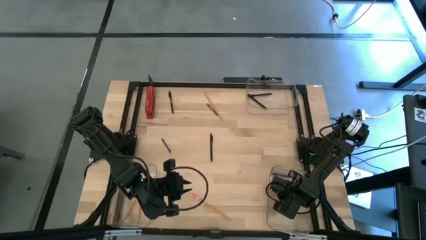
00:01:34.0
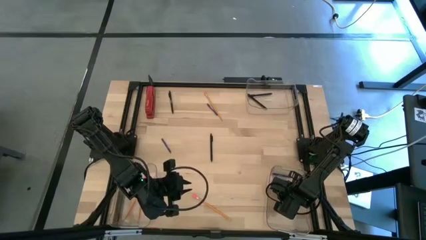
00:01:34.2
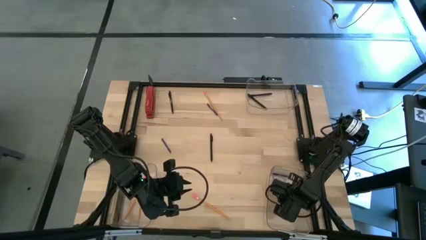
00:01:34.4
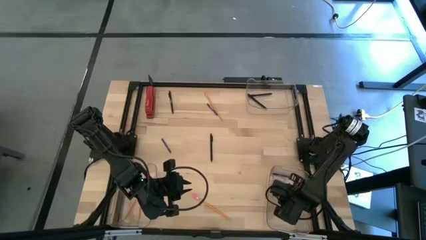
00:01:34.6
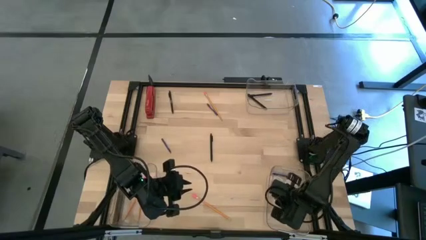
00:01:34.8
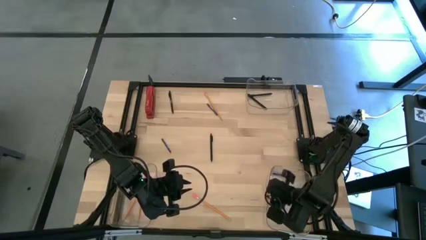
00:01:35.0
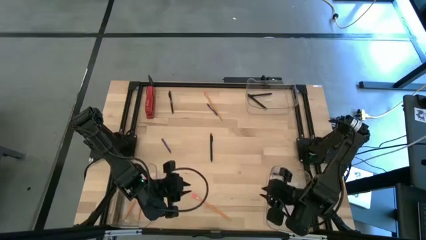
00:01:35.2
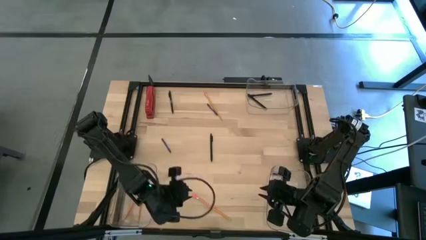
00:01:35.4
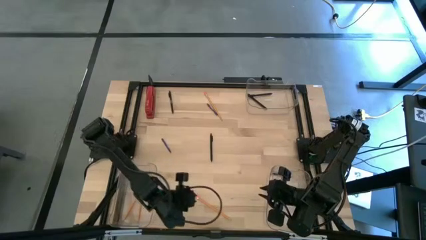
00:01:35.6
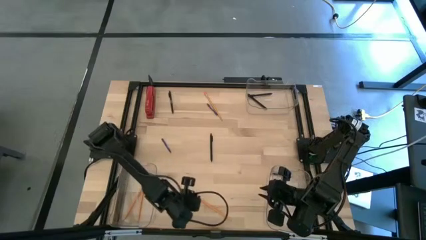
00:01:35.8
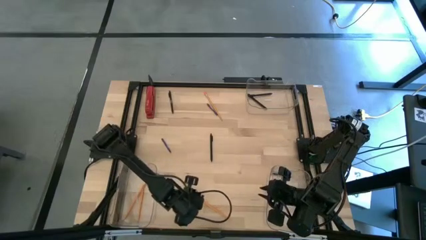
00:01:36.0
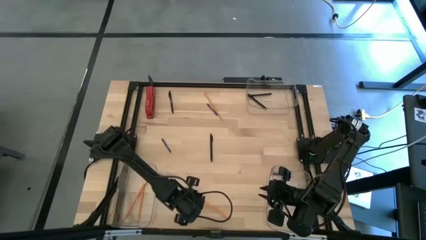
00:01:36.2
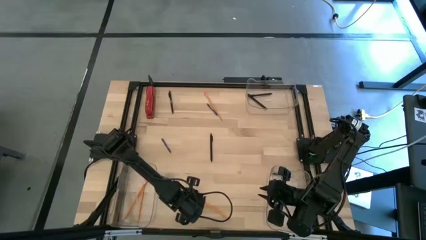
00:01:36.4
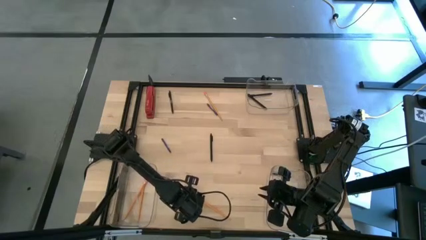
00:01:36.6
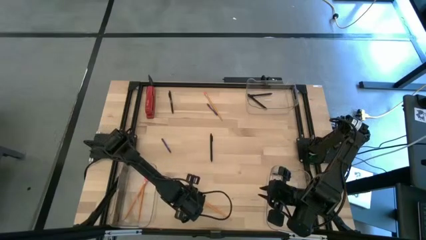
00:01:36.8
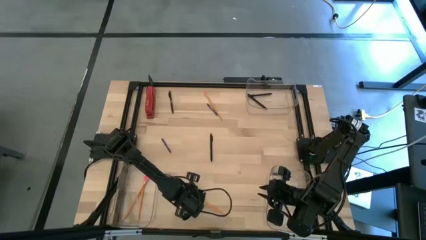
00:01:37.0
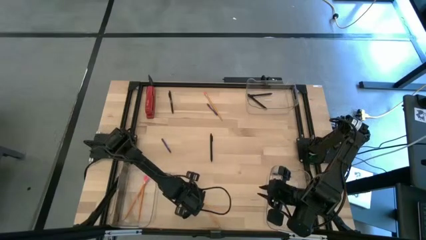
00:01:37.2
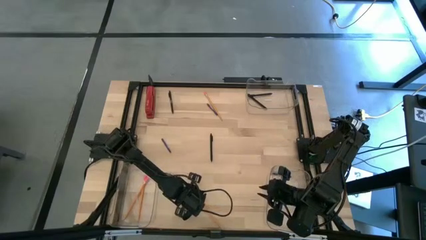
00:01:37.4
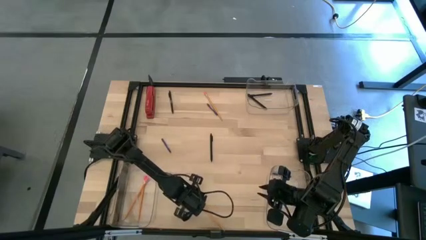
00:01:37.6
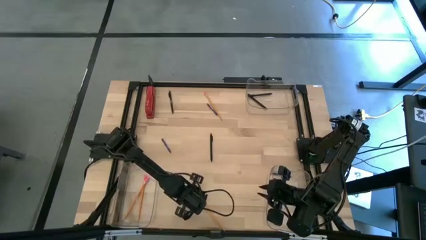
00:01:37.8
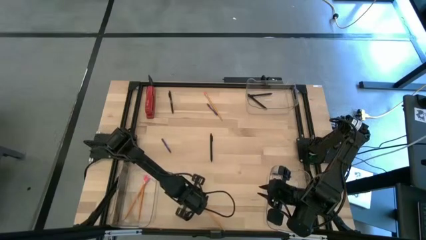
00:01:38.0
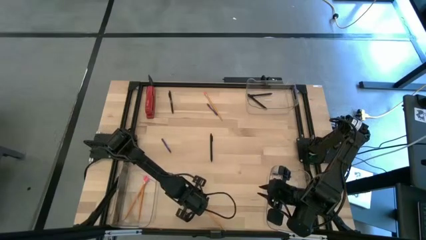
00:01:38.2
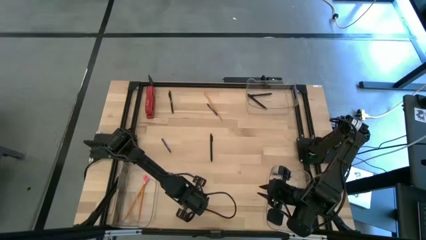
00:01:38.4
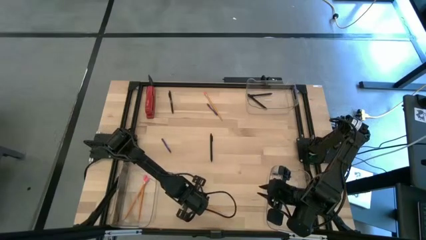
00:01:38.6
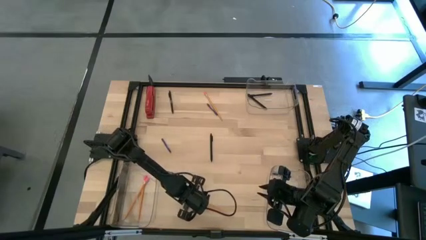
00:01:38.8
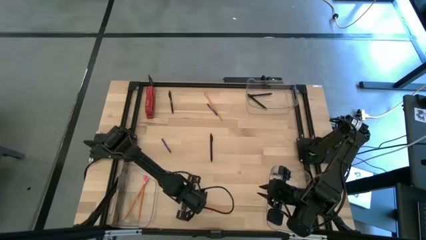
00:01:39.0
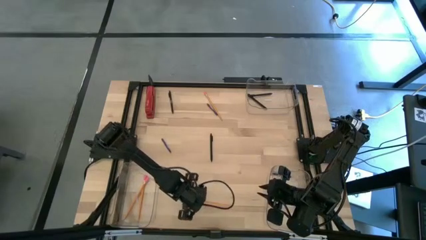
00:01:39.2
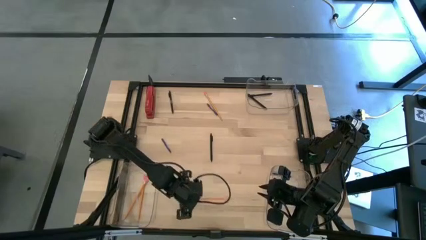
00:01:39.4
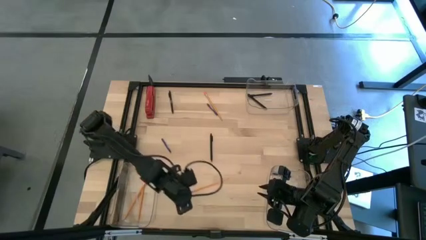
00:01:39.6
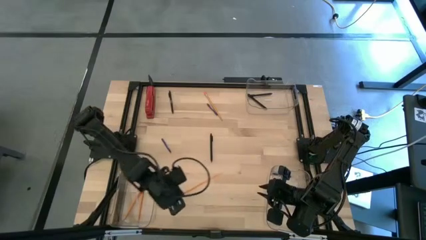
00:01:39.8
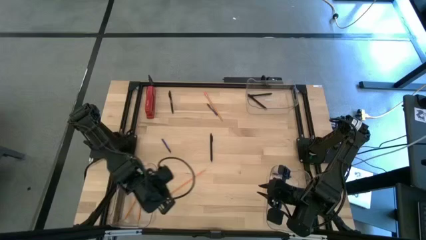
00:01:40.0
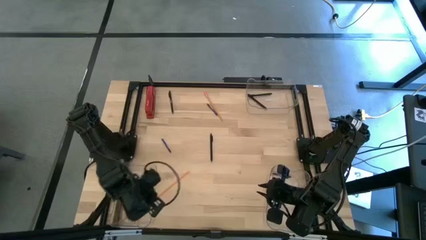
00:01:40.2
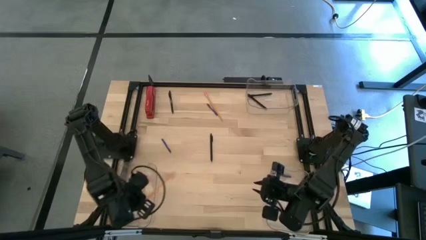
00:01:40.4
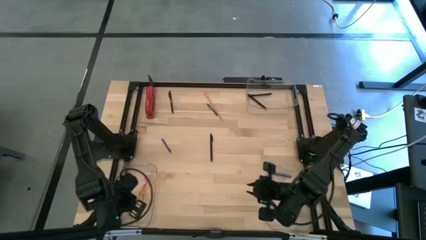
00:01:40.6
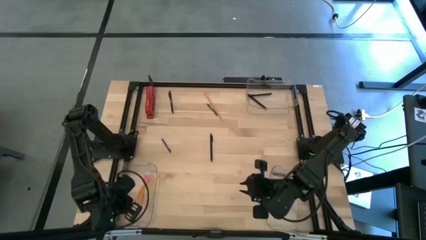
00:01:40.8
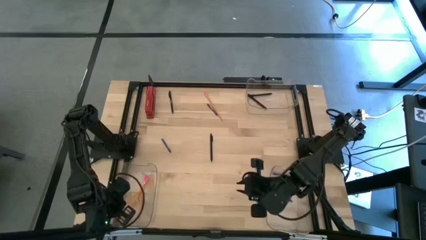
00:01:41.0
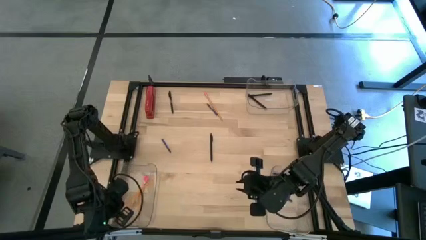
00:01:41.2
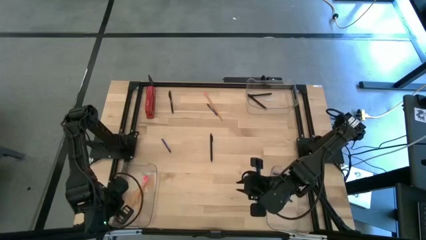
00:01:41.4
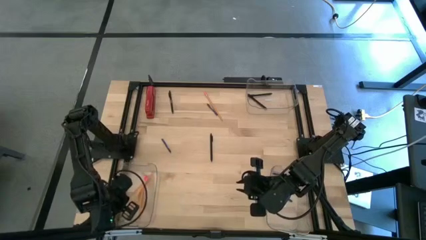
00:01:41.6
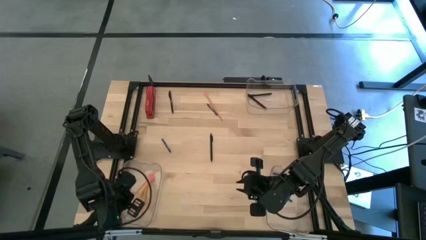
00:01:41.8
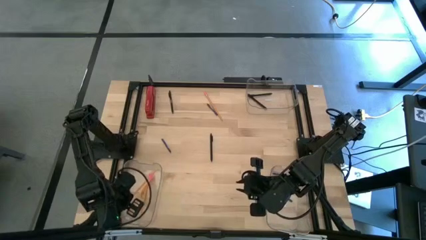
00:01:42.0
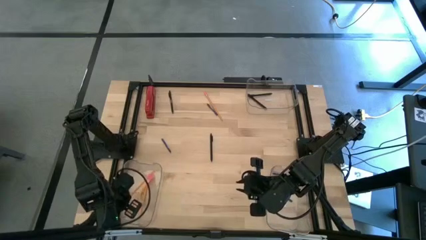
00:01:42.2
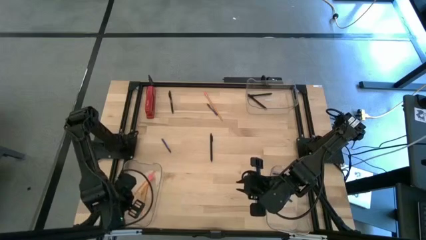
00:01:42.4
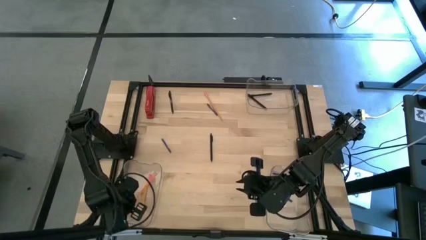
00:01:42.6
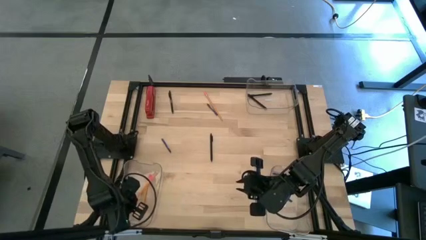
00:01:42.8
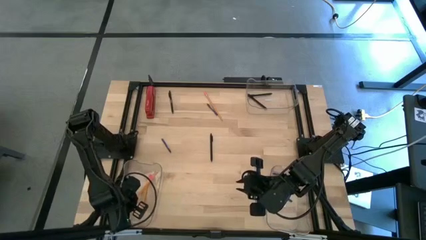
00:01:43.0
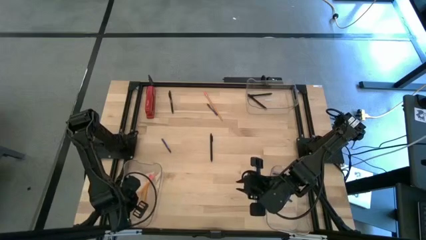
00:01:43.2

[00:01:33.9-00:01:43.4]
Task: Sort crayons/erasers/pens/pencils in bins
Put the yellow pencil into the bottom left transparent bin

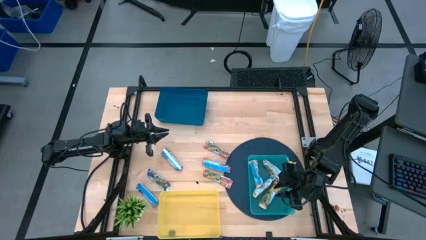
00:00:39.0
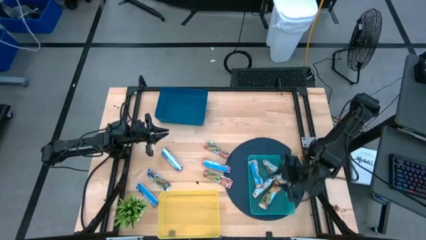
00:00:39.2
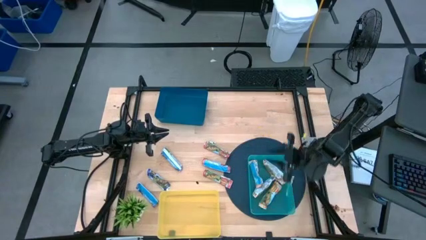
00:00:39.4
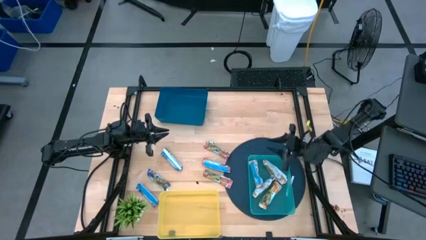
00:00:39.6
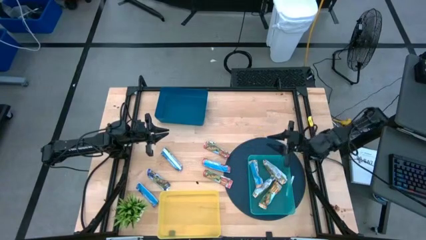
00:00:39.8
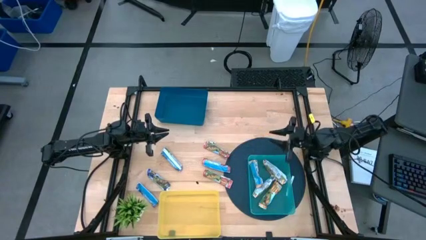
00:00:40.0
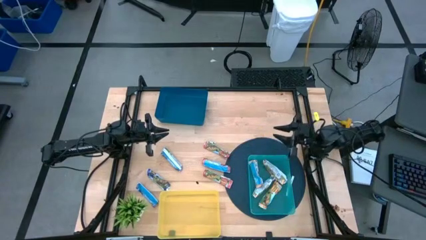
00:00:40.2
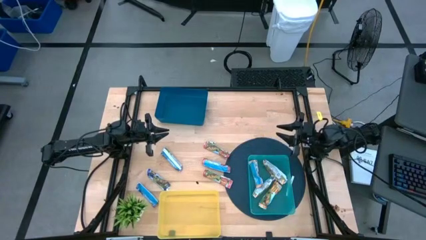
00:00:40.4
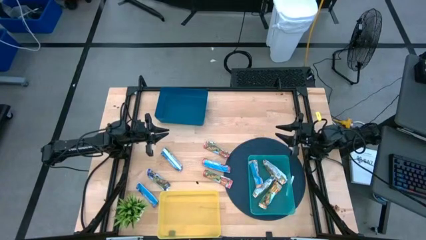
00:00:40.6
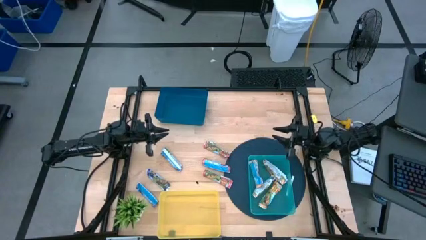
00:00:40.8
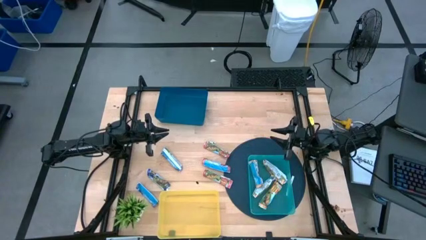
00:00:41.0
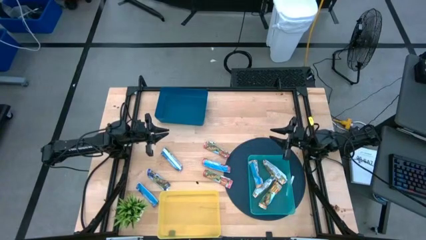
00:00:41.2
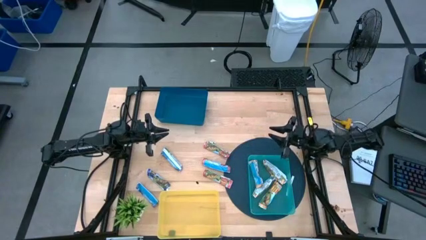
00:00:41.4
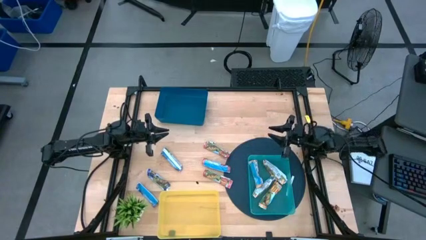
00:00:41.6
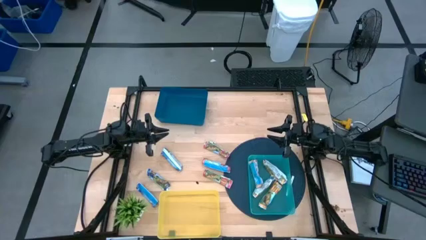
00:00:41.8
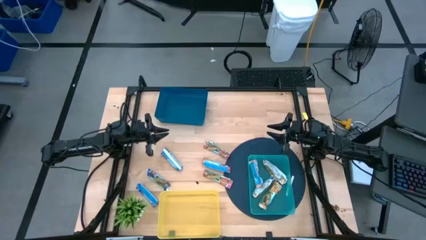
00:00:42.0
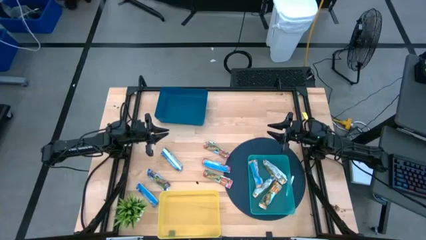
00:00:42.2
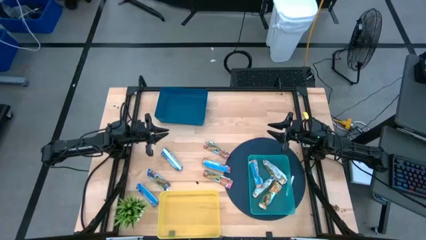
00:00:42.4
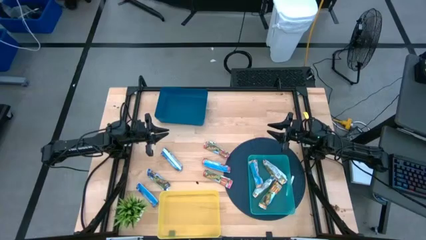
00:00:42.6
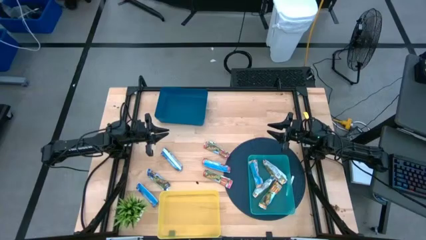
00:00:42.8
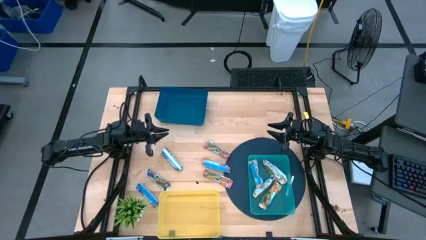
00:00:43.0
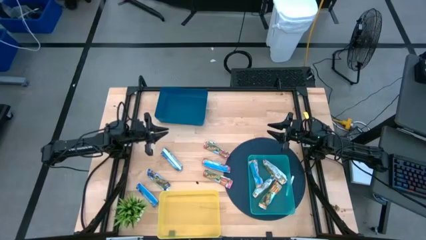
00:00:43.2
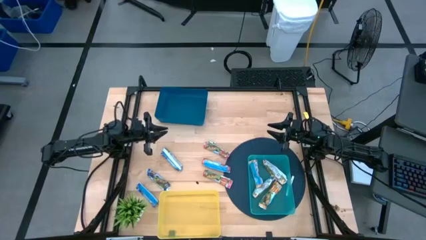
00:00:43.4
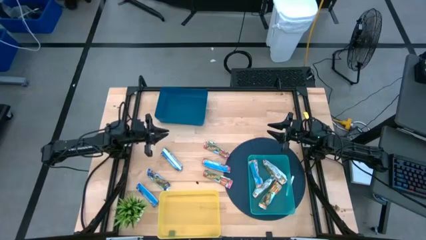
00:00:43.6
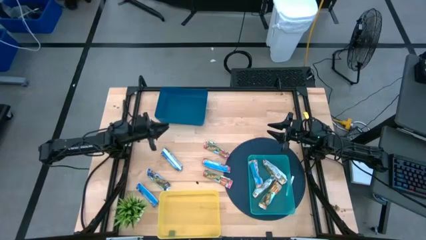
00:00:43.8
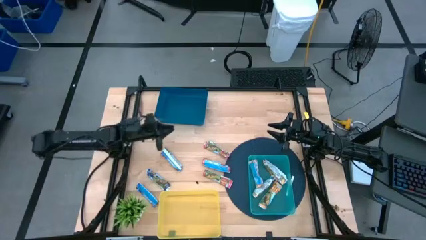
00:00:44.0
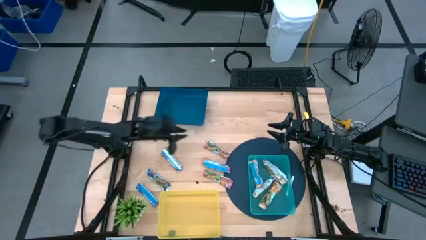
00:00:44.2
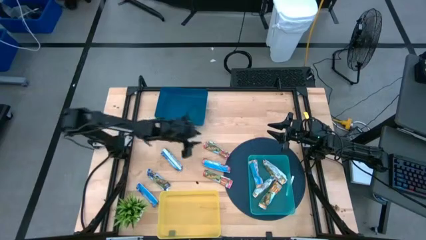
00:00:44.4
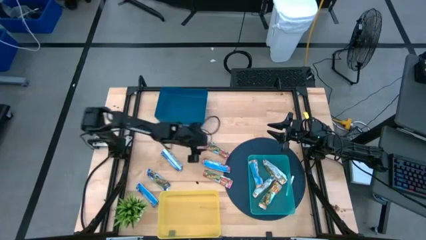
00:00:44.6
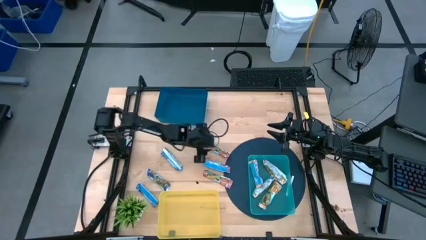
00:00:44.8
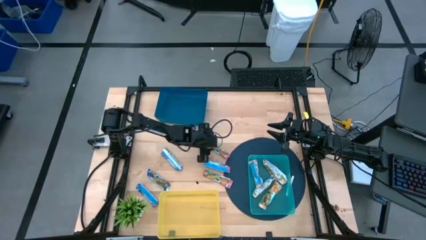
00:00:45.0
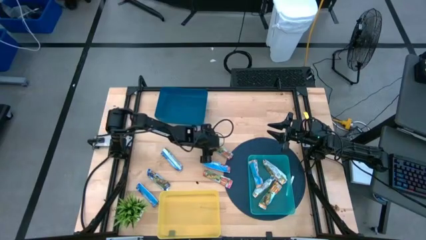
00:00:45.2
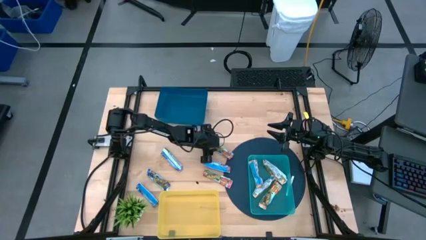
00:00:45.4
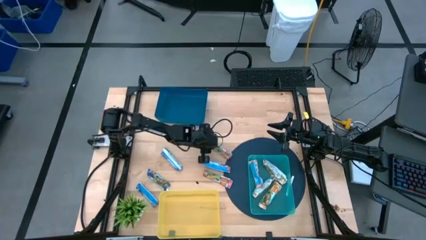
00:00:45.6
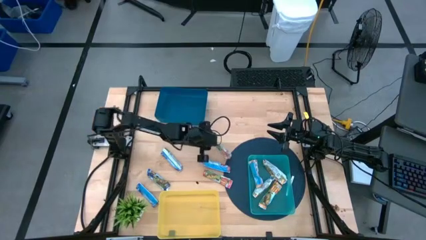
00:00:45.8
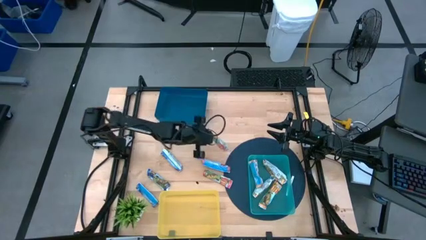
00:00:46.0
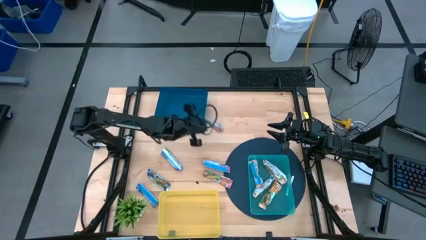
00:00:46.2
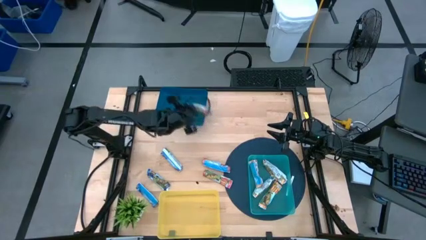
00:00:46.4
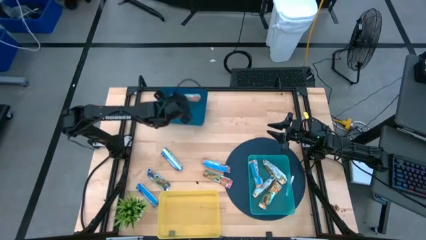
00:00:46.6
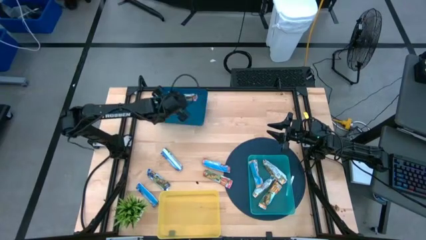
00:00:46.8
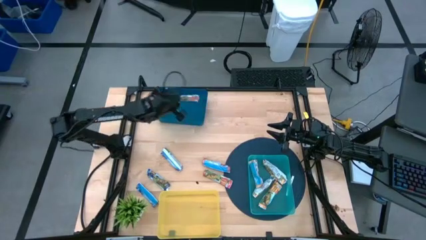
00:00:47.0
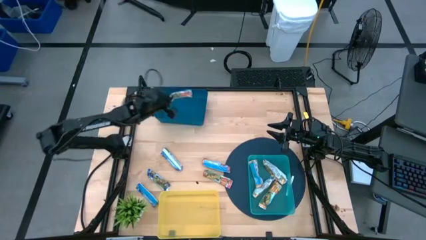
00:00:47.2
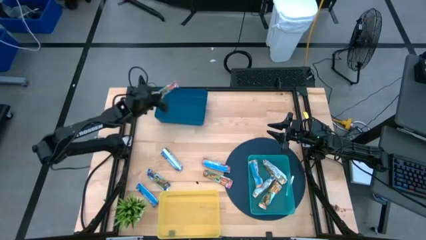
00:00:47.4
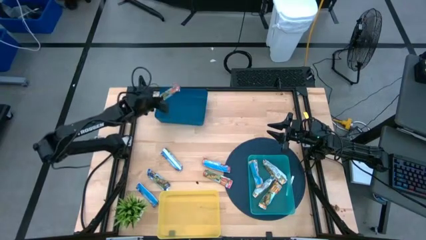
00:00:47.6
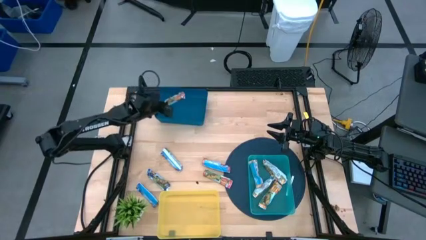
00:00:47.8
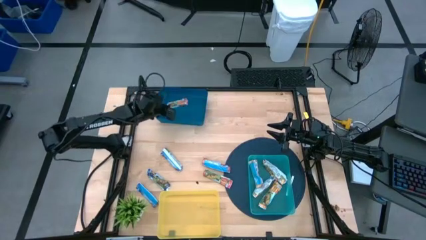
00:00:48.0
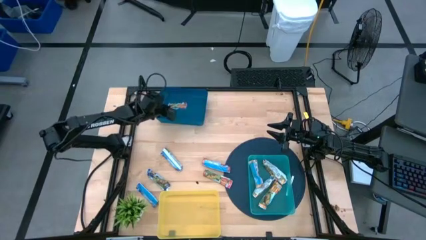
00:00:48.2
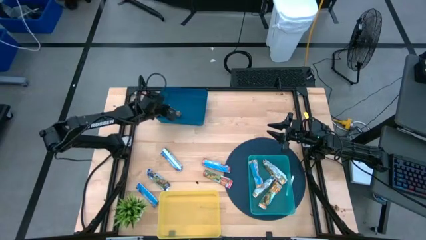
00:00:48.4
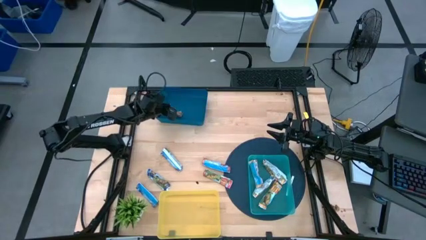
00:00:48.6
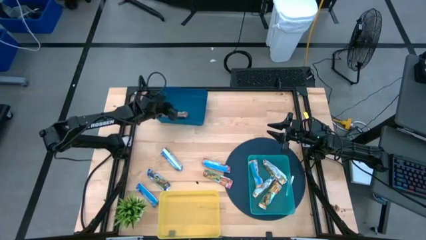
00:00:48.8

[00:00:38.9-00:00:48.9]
Task: Pick and place Granola Bars by type
Put the top red granola bar into the blue bin
